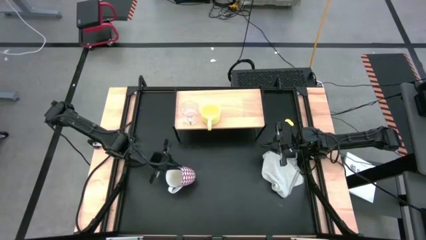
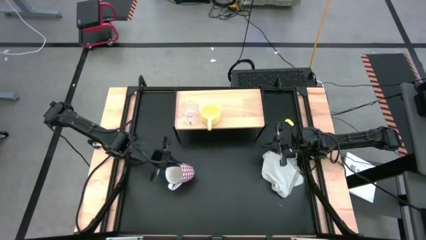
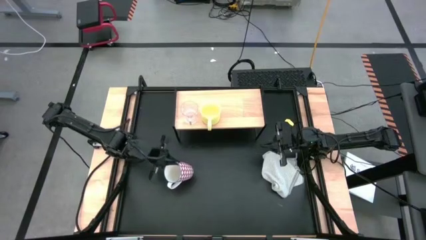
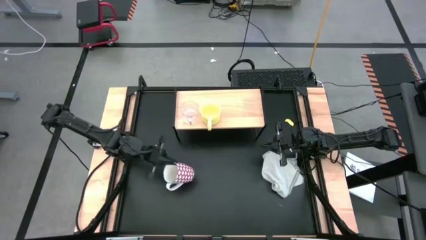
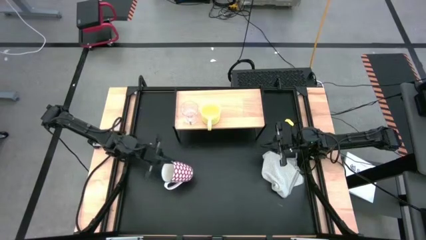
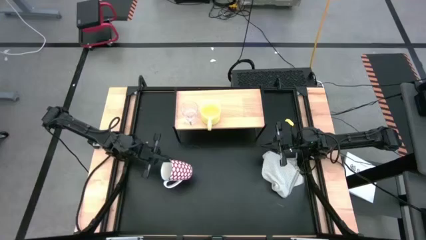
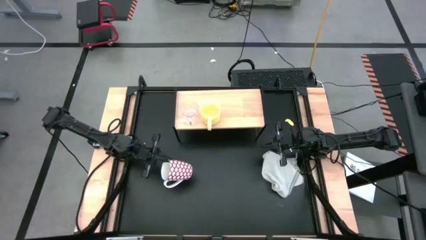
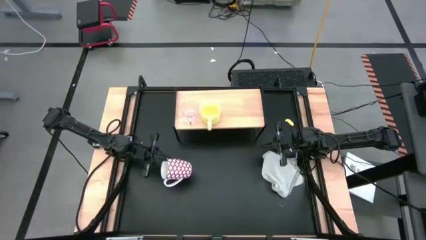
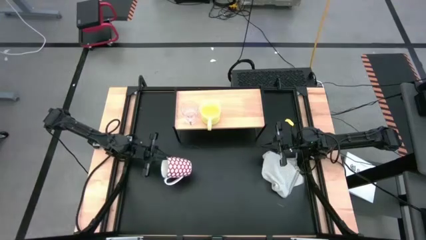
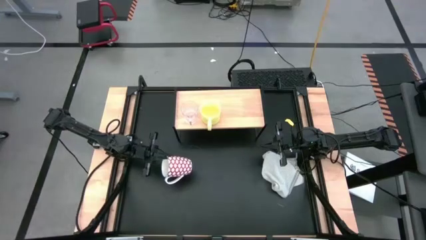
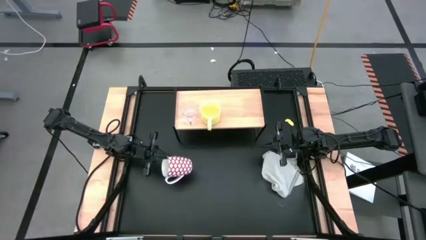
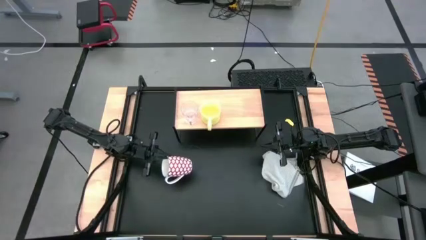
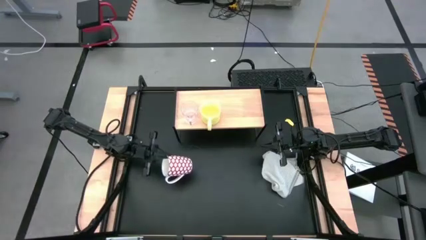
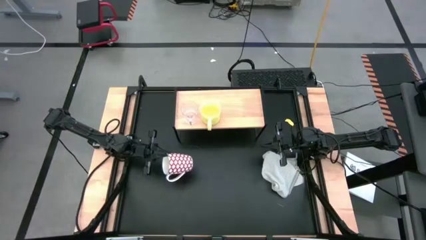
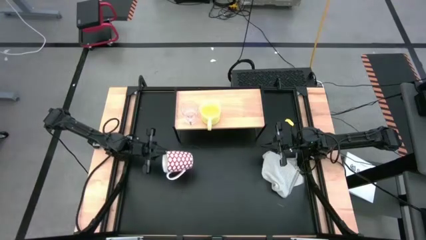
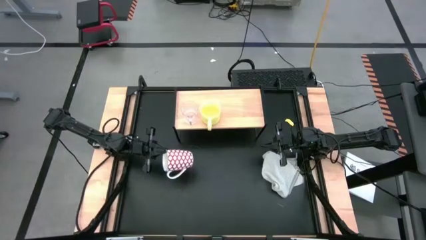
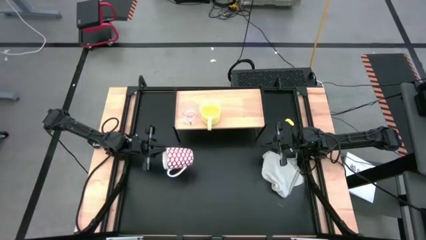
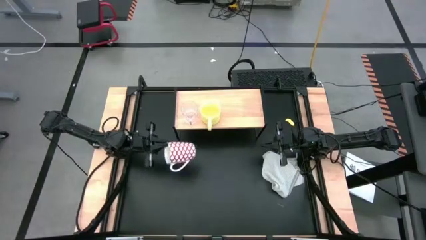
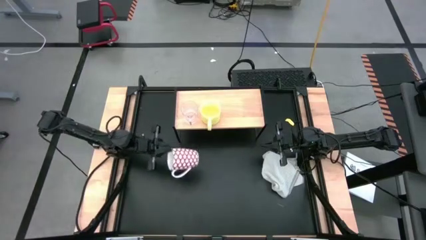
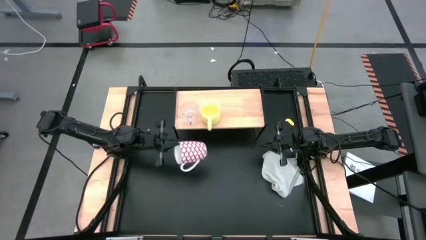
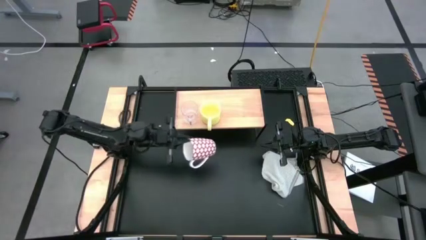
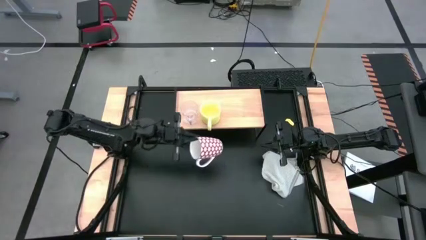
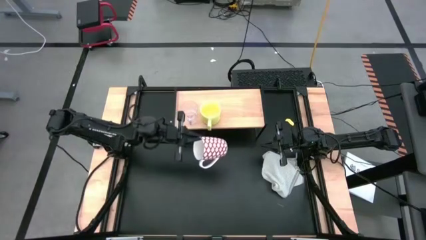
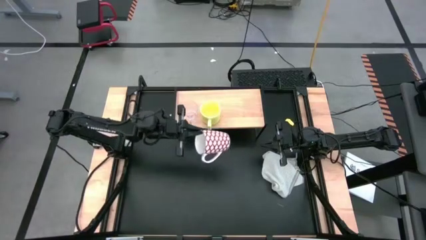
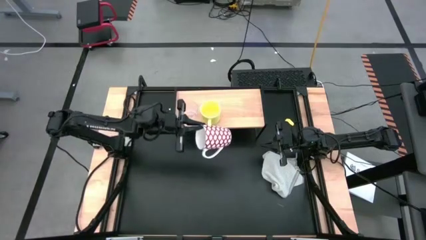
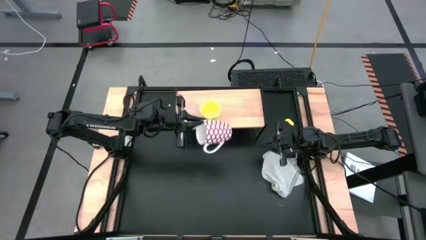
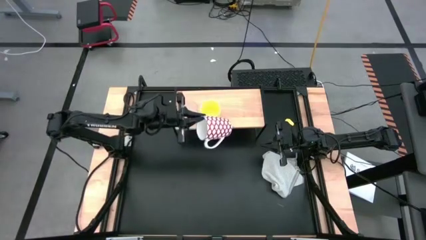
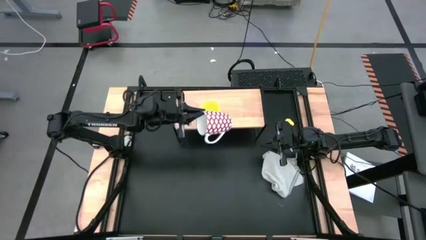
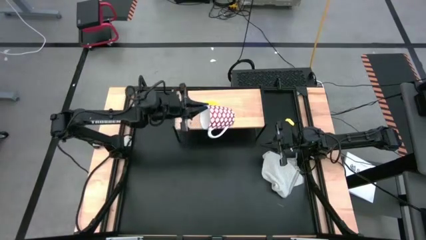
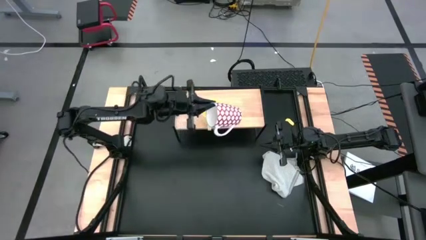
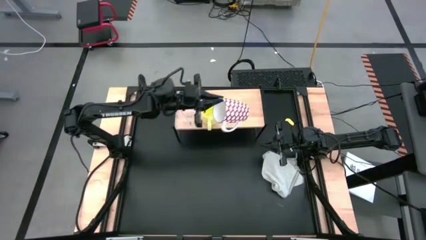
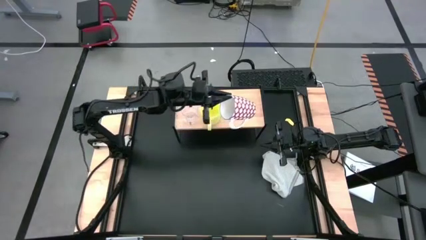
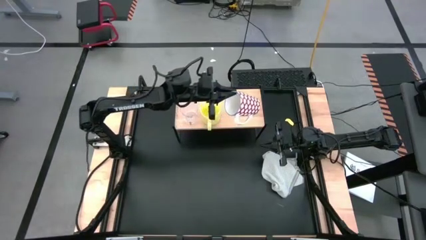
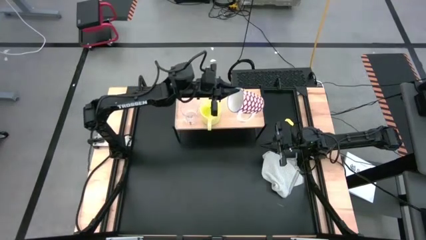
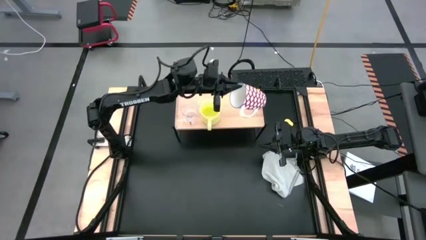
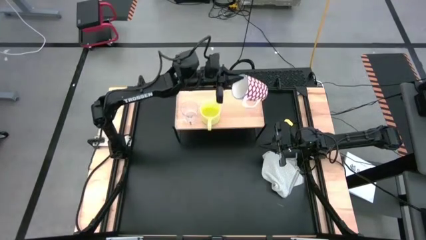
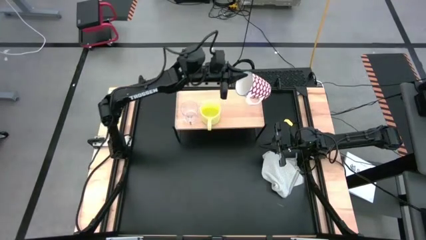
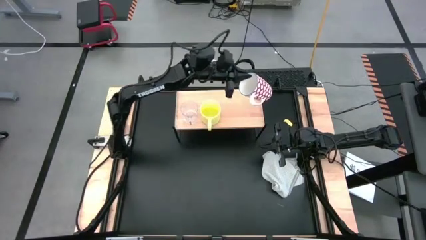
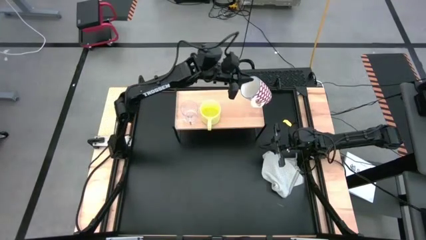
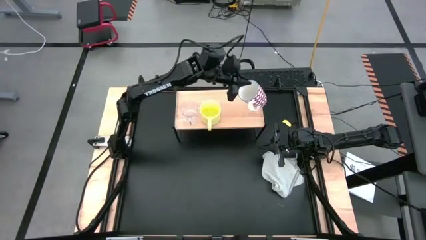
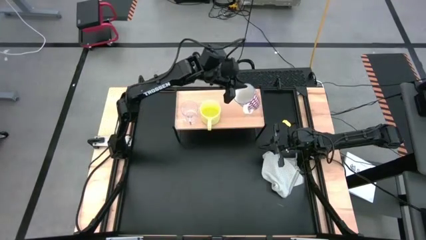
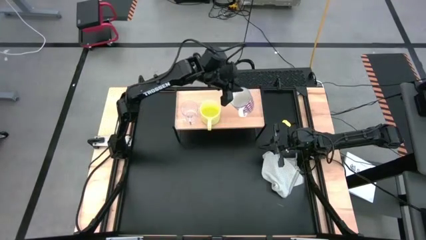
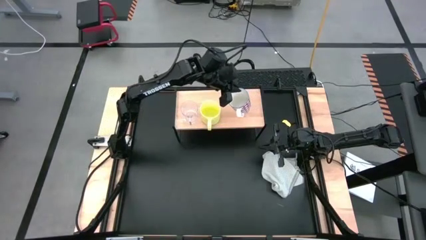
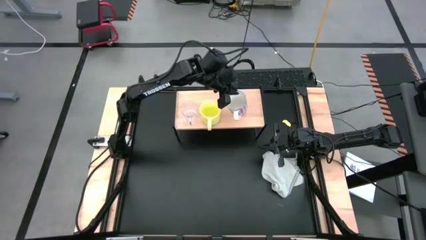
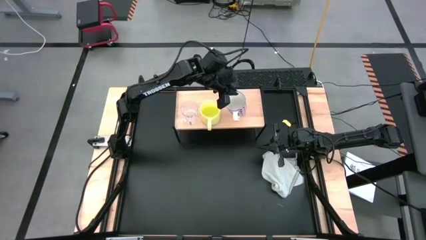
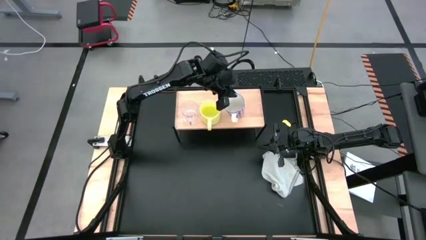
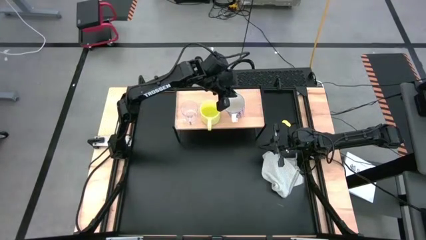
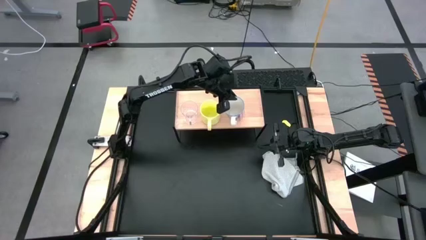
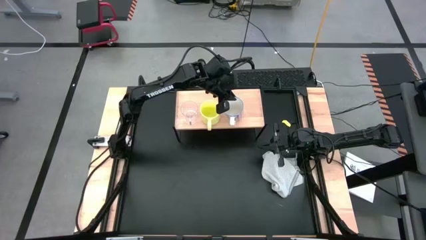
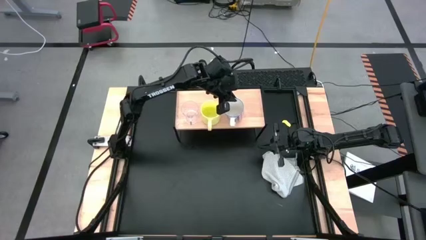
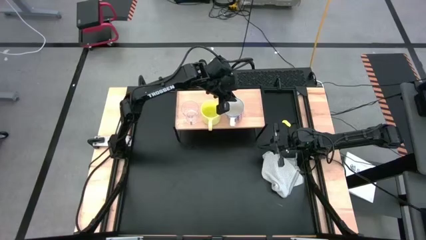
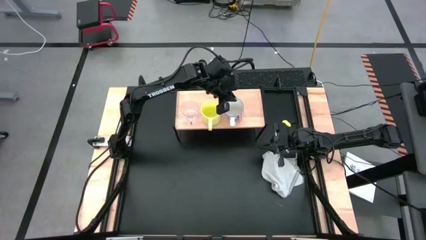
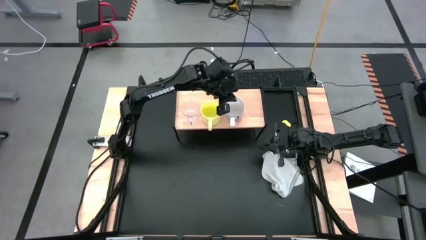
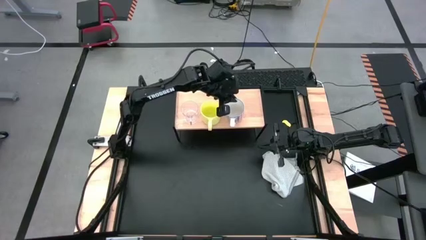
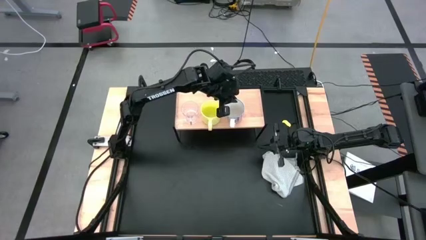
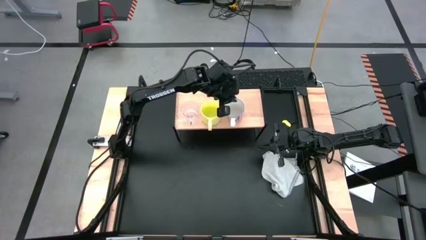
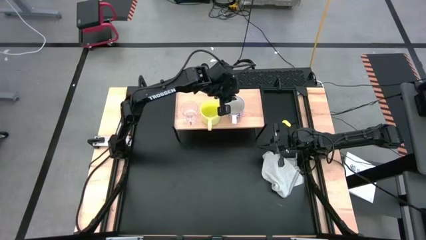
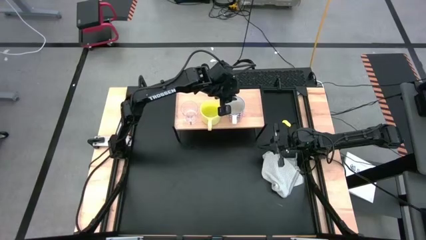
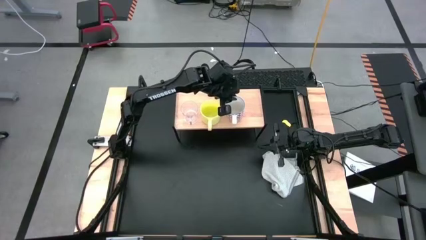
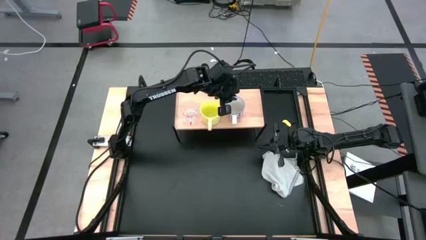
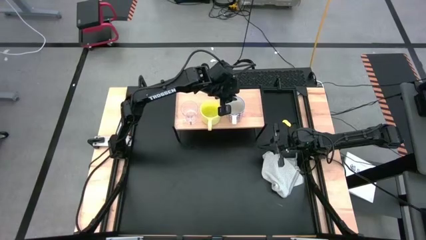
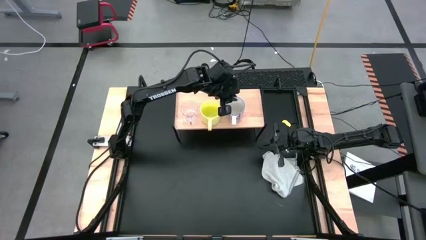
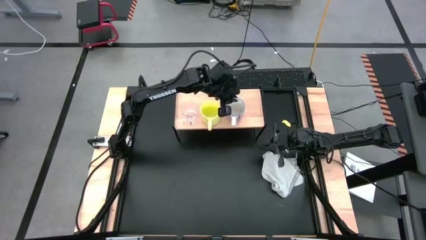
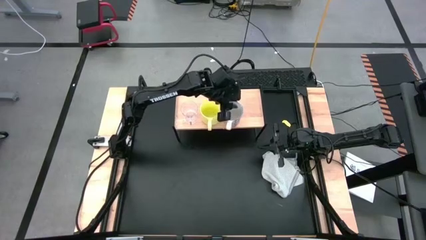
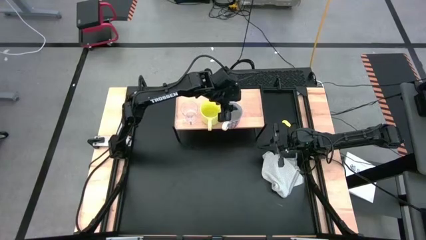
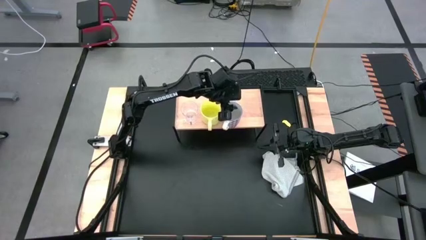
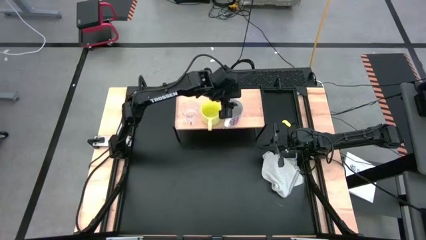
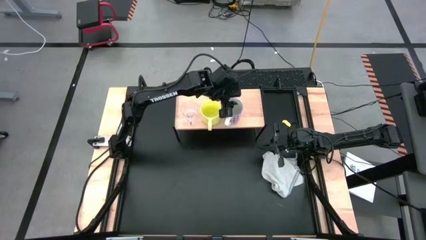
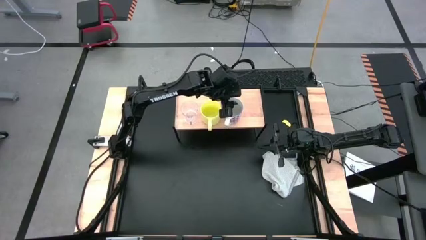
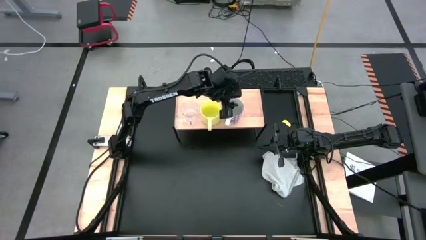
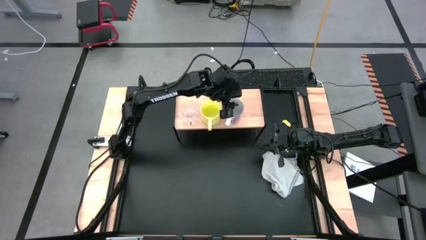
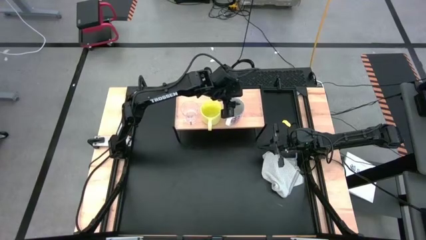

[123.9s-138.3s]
Task: Stack small to large cups/mugs on shelf
Put the red patterned mug on the shelf

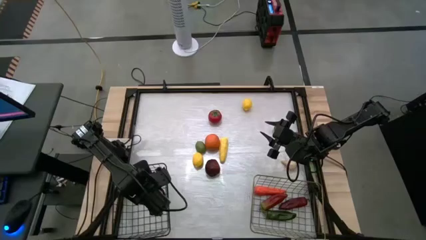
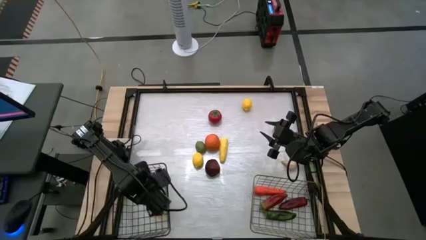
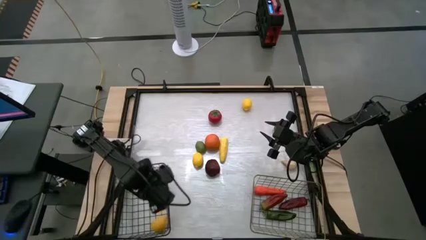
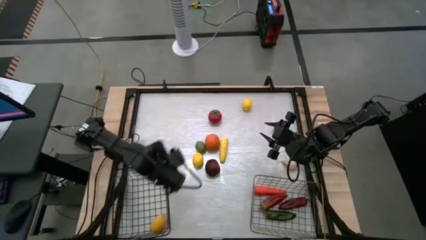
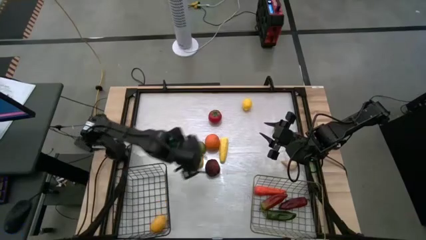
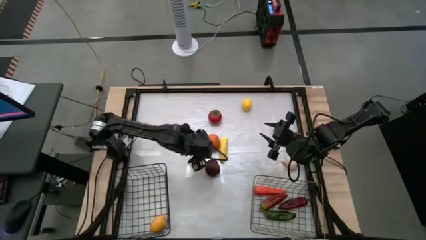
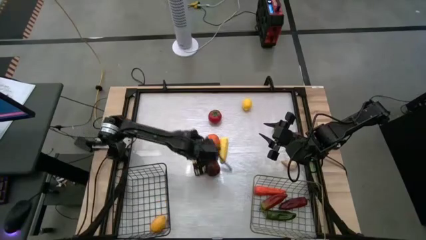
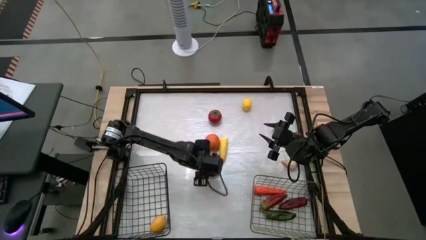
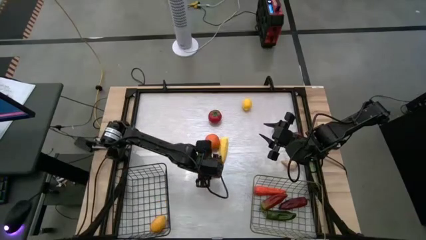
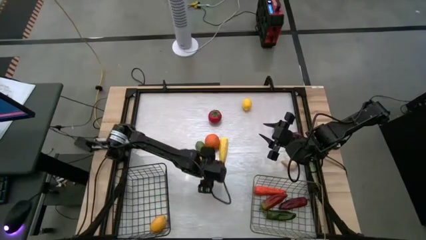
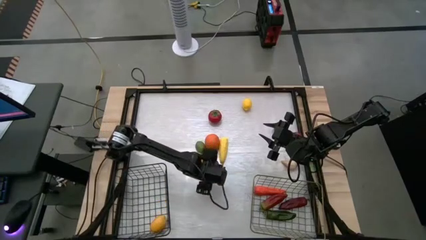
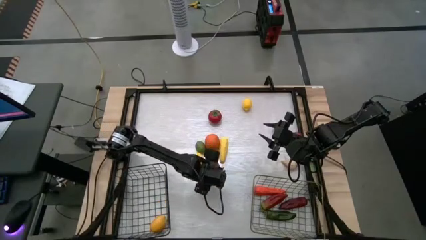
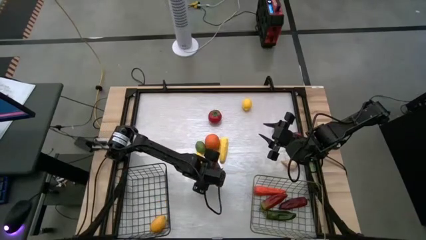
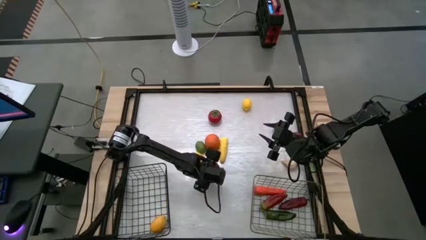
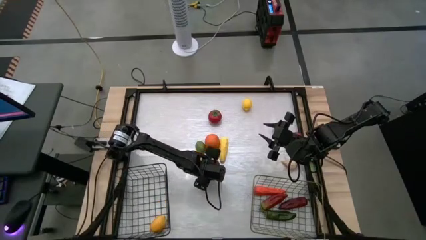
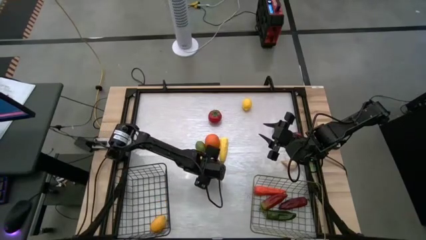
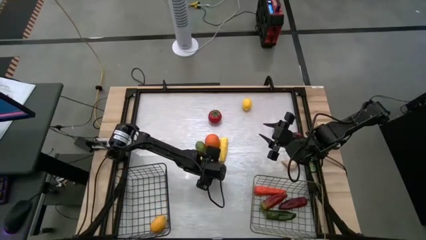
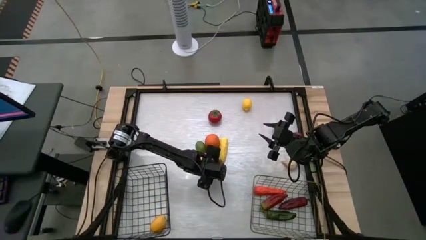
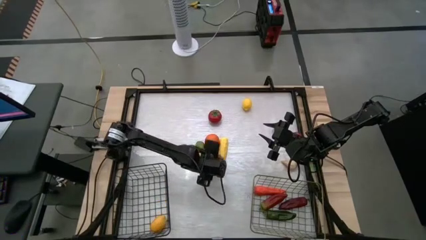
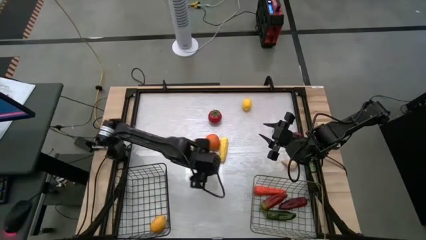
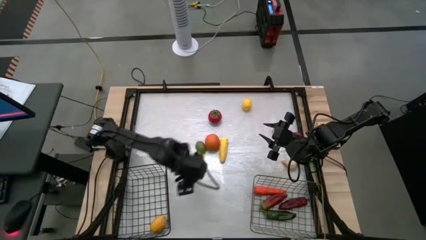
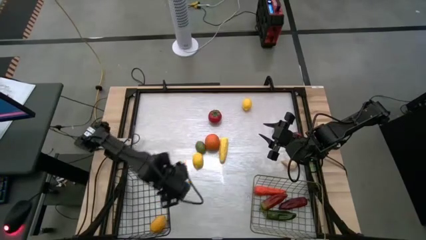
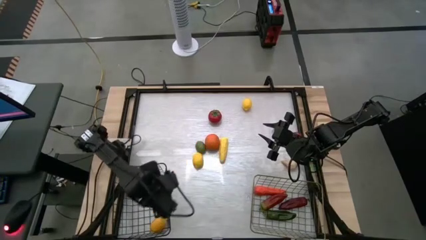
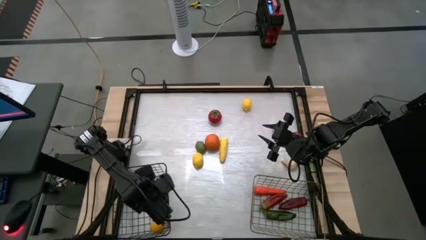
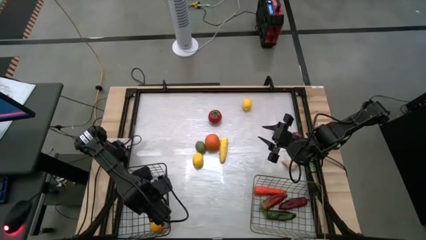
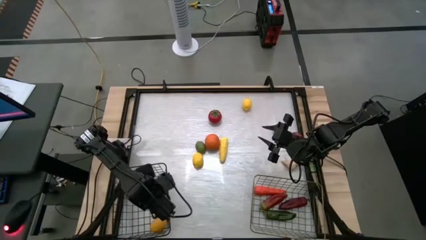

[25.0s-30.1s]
Task: Sort produce into baskets
Put the apple into the black wire basket
